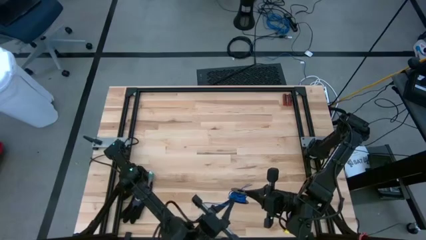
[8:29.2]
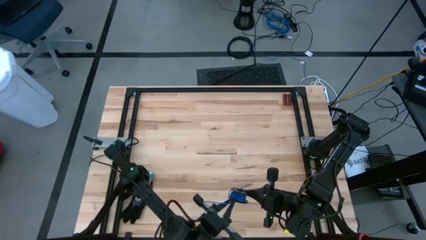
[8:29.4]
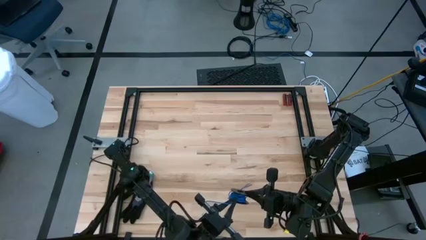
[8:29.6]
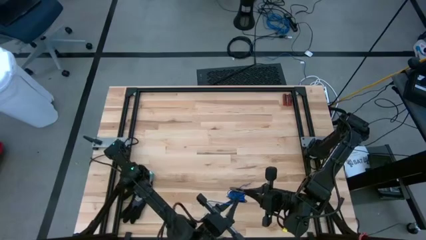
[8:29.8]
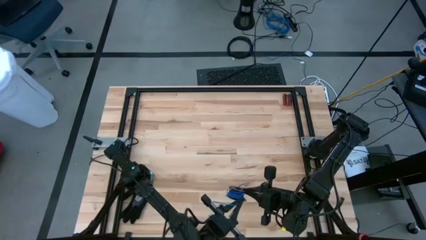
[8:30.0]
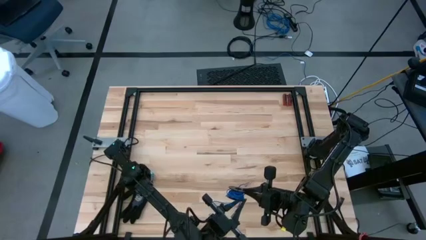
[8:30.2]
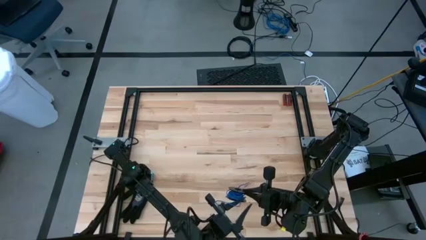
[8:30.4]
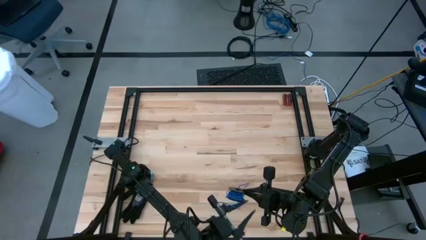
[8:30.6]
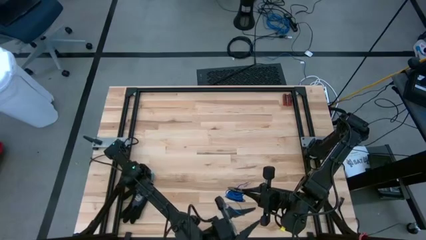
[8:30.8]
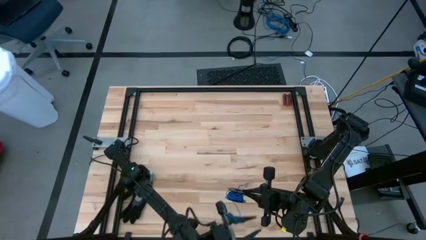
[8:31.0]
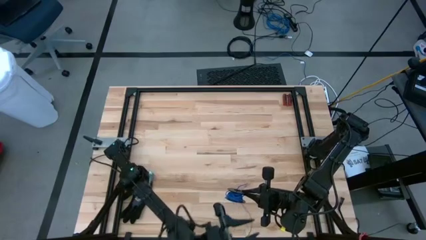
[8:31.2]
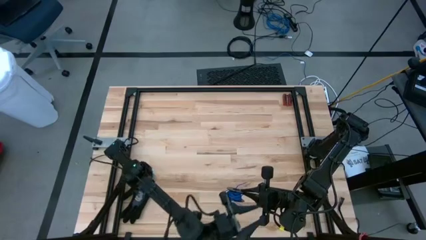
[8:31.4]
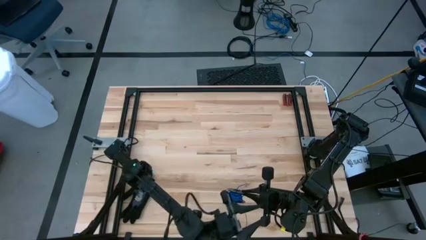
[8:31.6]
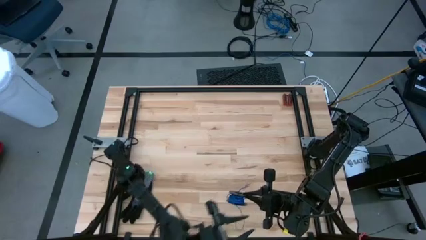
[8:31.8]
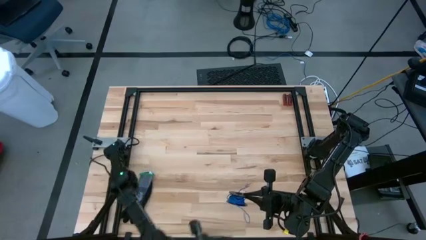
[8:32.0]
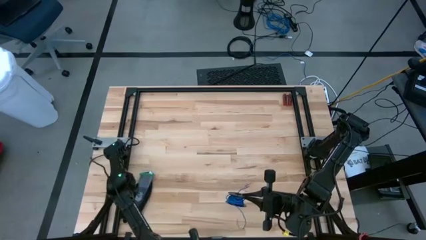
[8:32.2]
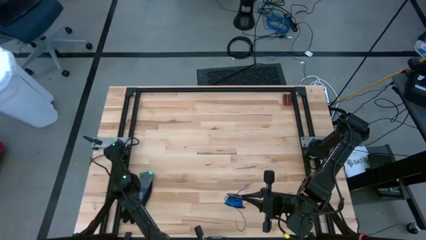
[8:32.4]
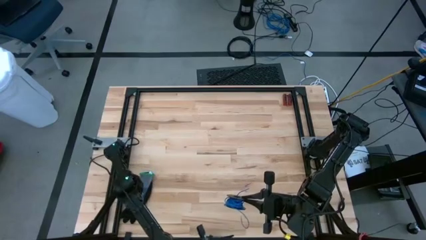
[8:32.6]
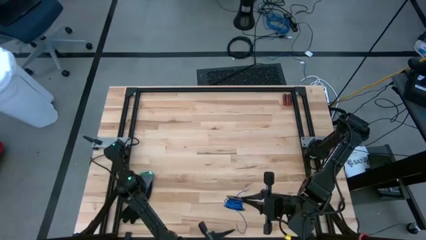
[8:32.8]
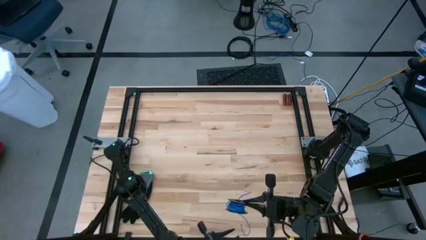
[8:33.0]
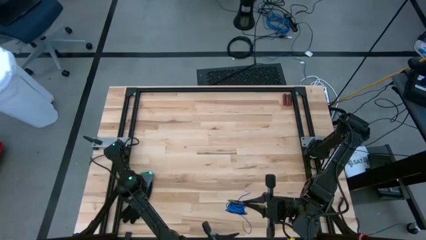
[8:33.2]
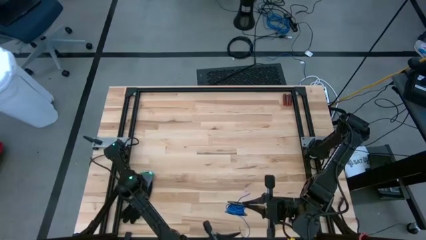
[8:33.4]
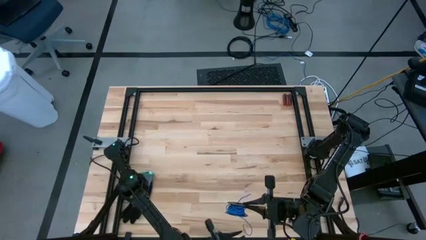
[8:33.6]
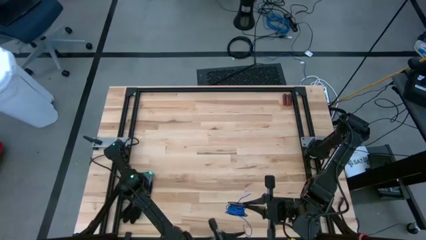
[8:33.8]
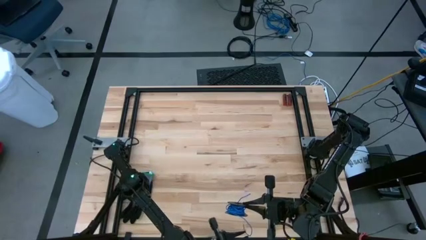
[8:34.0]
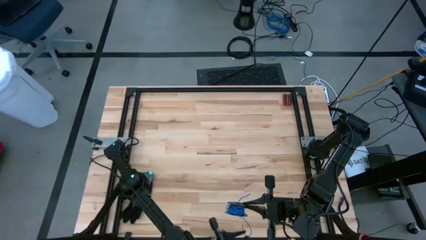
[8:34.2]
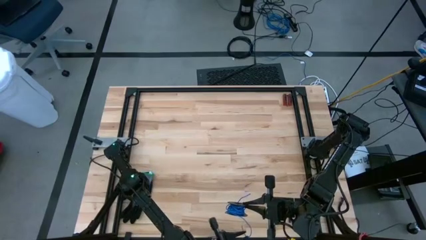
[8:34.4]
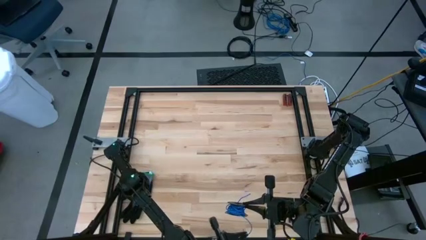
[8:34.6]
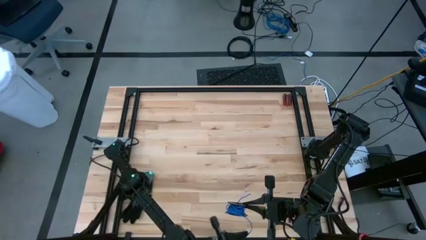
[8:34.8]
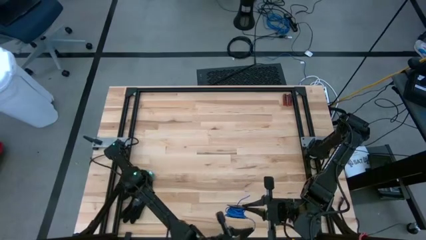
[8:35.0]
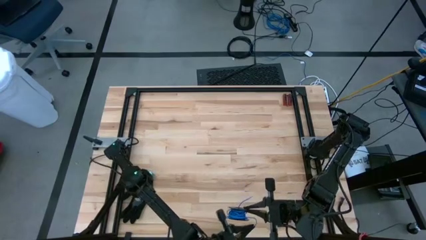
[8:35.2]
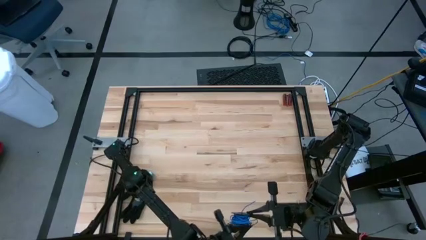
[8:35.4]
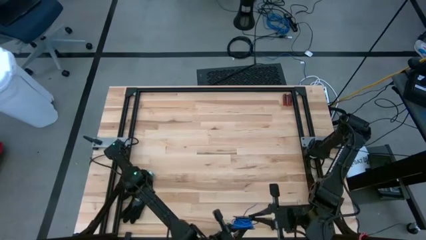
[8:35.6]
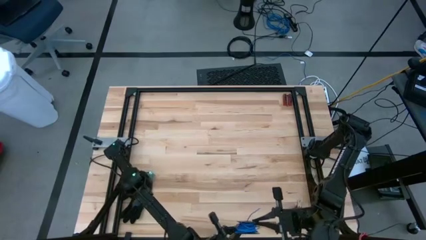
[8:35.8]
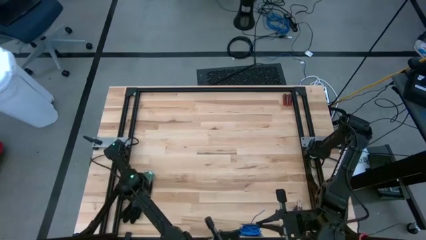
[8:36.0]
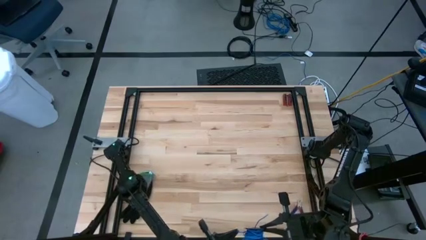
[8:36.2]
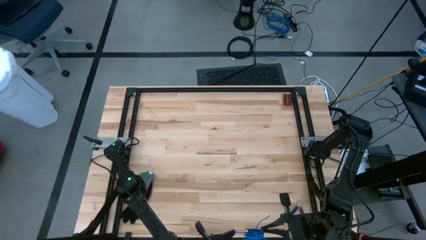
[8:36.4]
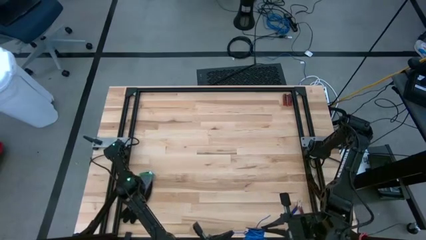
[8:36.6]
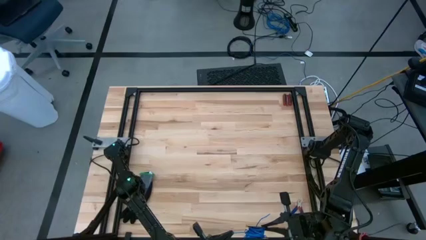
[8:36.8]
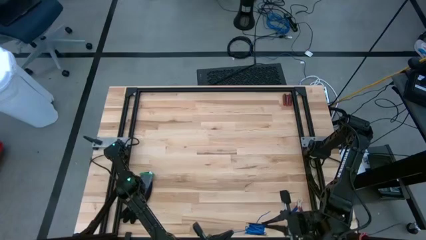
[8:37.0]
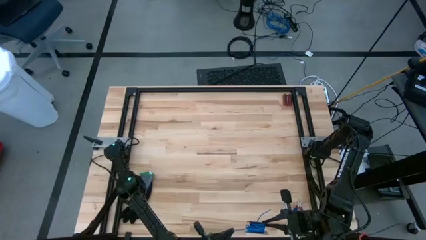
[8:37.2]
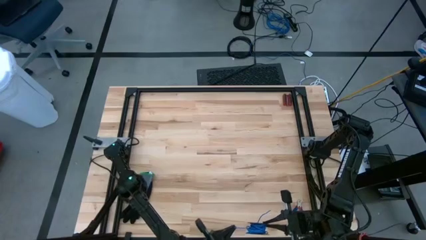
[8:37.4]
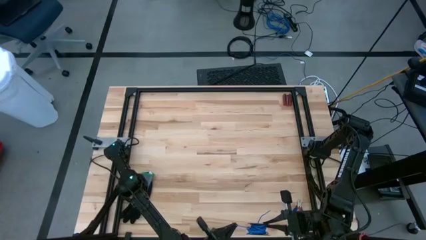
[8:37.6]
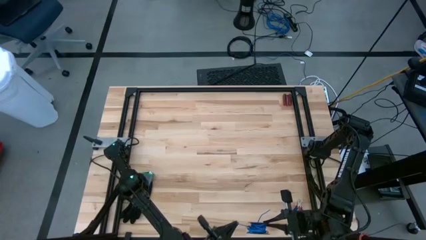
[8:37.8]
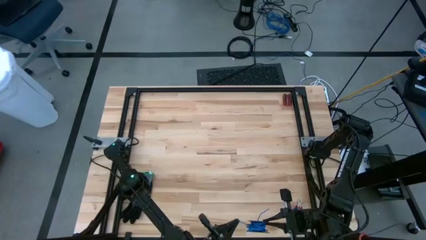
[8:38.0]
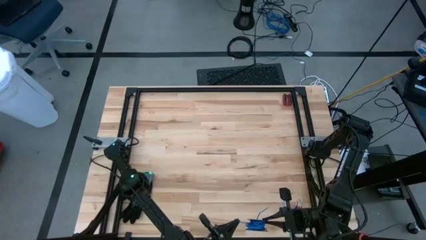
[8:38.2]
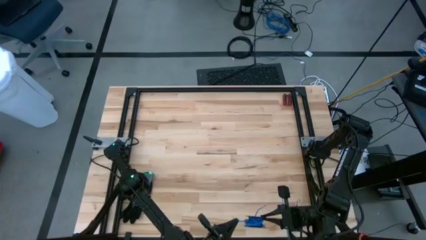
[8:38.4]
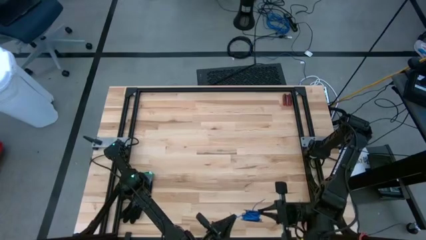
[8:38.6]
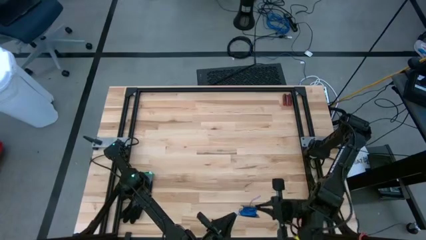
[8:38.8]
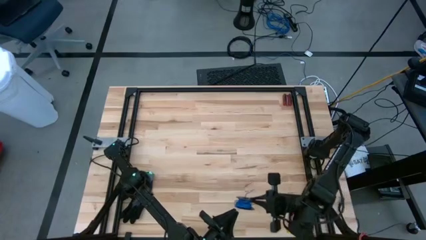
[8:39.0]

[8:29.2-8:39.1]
Task: Coil cords
Coil the blue wire onto the spool

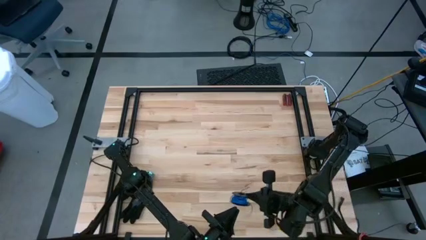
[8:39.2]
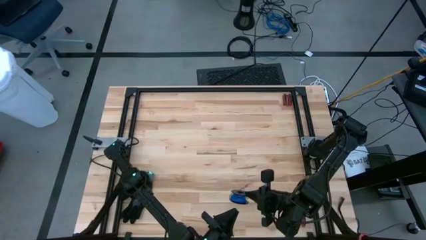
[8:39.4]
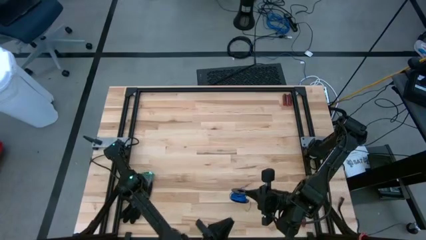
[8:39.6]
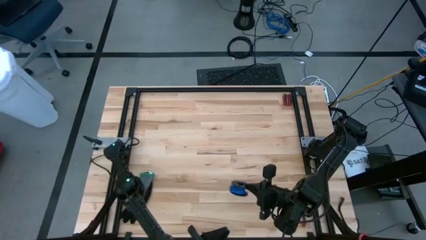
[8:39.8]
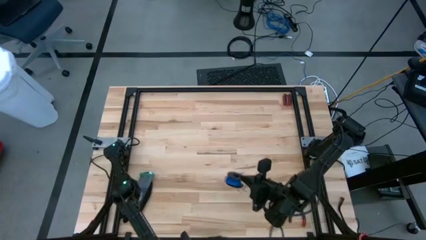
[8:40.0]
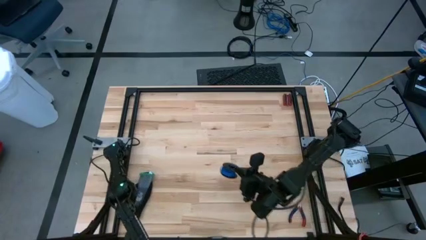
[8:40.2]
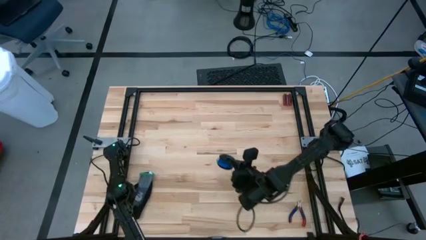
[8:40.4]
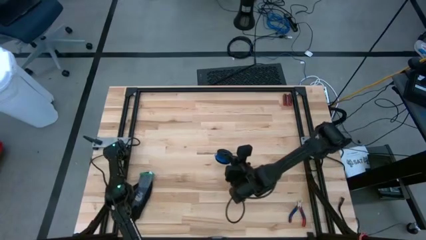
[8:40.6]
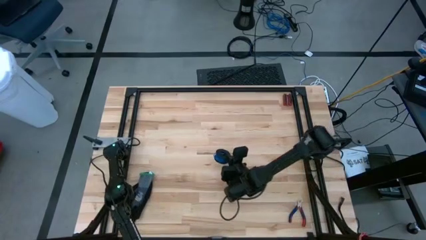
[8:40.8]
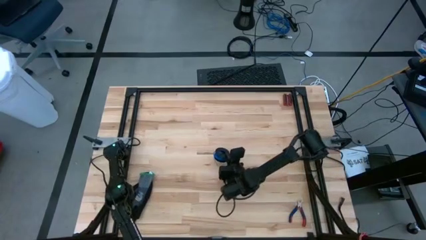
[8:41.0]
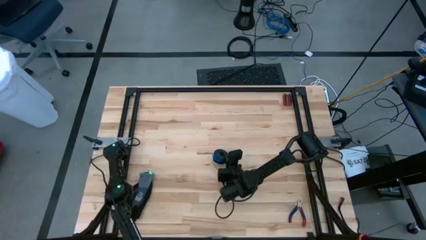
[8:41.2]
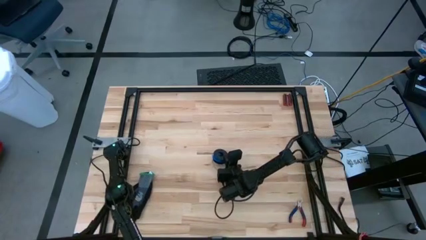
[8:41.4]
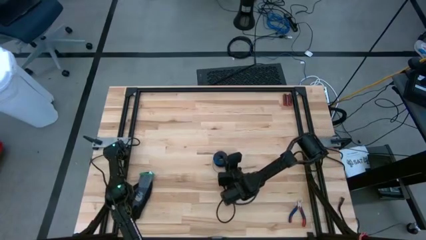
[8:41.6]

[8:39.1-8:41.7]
Put the coiled blue wire from the spool onto the table

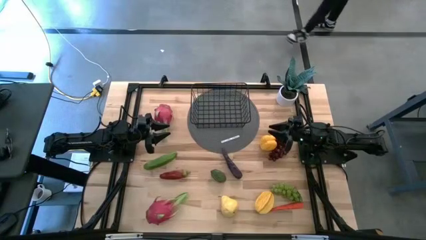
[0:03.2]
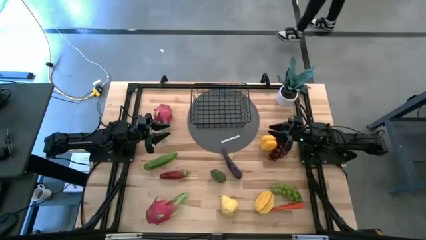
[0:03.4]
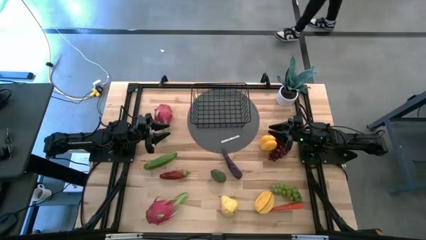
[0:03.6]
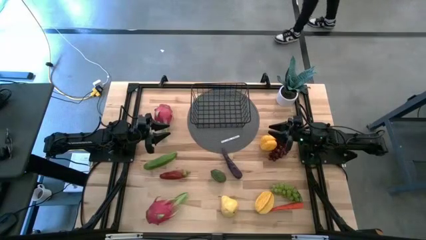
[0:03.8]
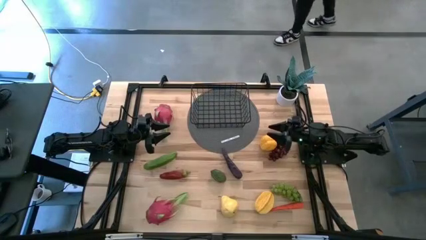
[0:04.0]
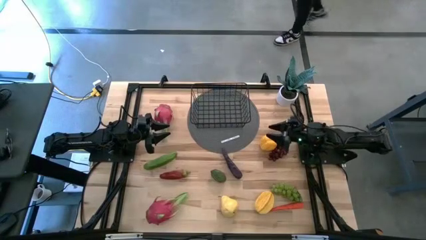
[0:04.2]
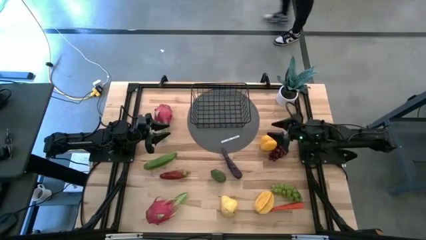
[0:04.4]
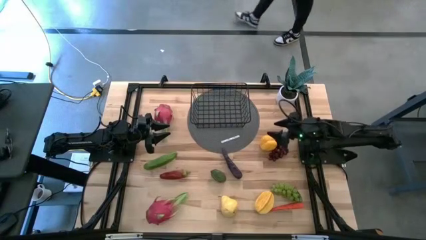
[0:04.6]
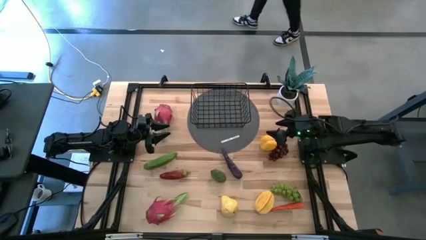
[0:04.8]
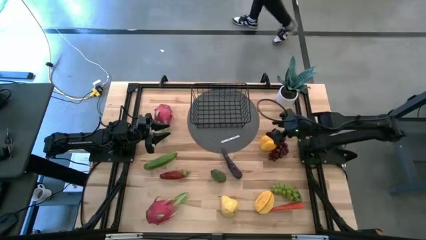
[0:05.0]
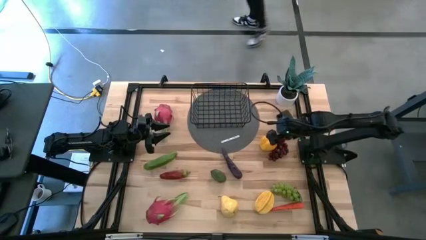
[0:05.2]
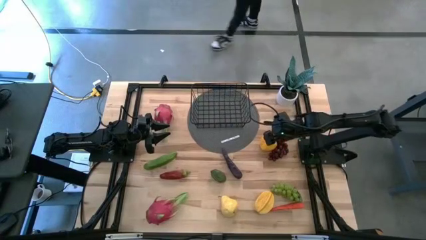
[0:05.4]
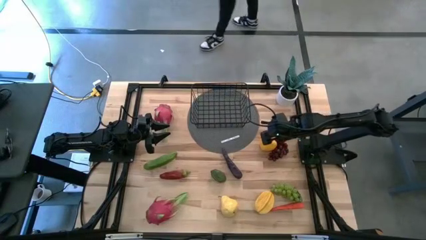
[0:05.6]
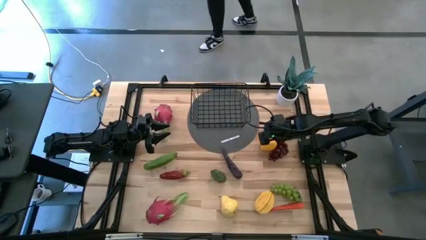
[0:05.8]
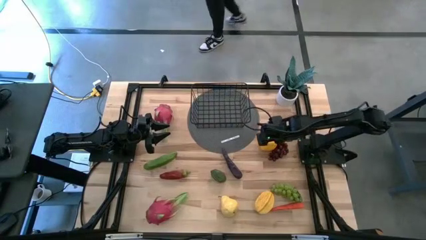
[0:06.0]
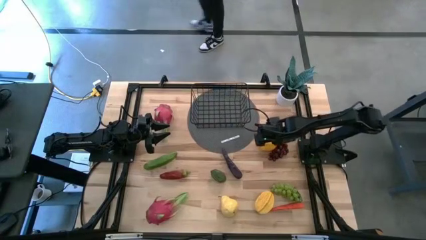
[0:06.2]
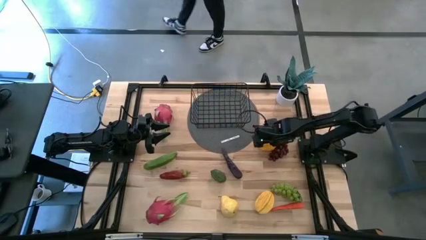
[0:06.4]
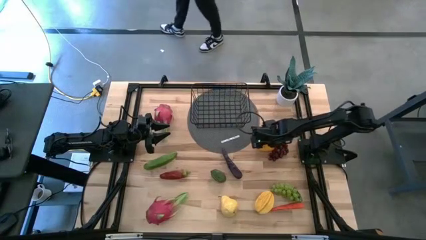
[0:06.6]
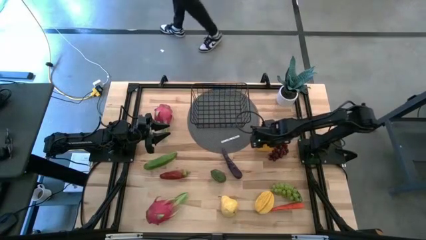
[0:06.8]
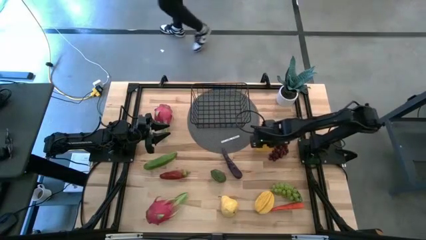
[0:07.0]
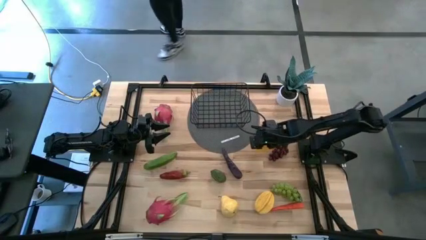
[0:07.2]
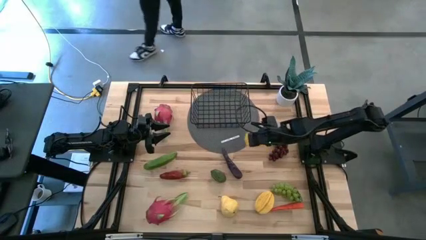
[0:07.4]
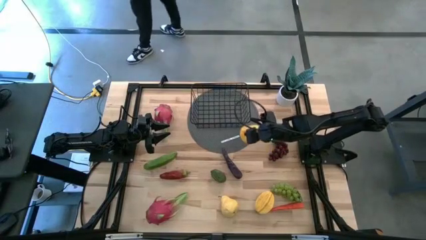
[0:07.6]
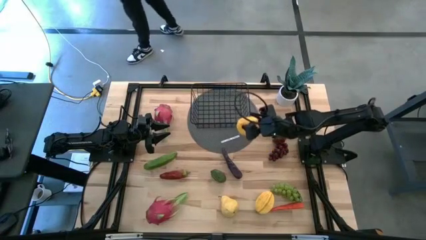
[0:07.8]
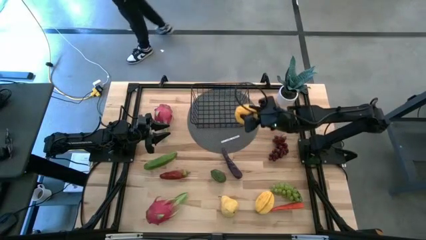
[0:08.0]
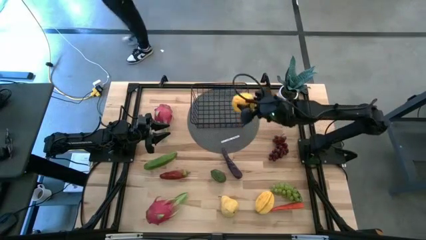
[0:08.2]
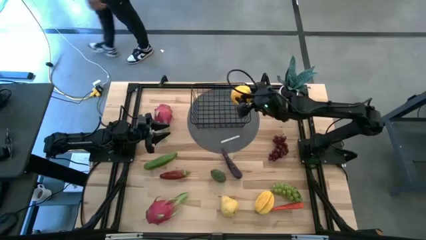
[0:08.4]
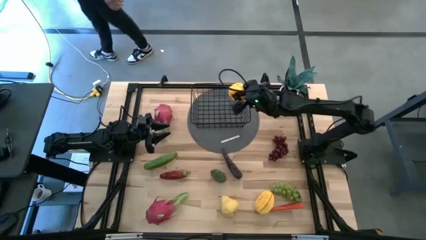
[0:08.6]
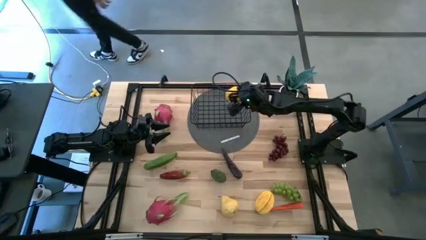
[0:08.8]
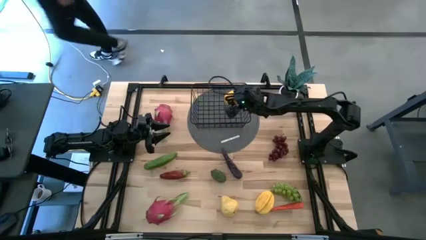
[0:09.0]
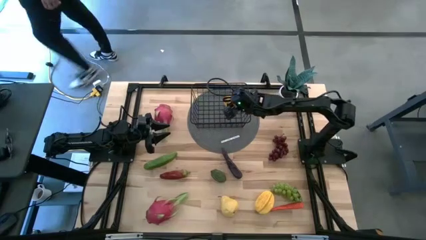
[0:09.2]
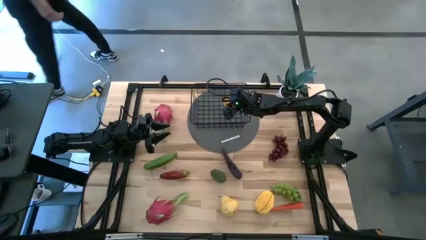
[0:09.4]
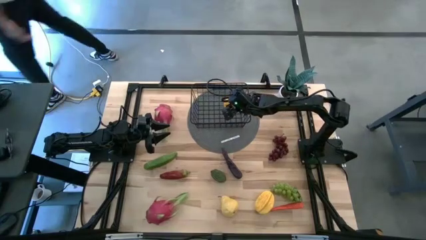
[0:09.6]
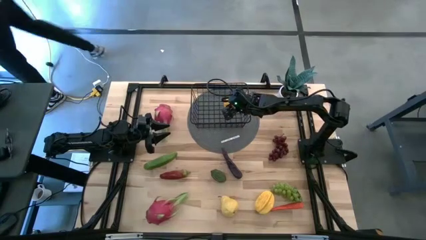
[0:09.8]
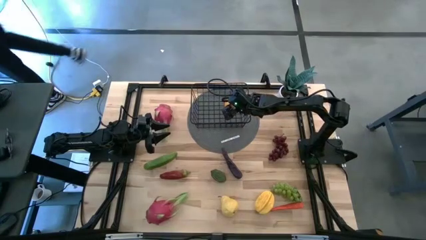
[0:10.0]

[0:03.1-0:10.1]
Task: Build produce basket
Put the yellow bell pepper into the black wire basket
